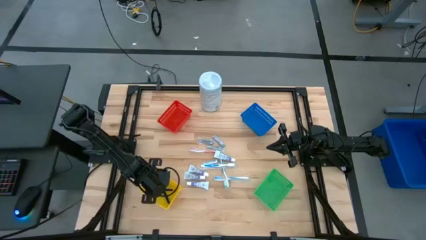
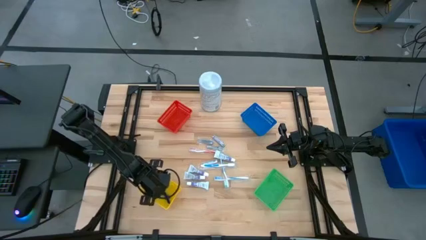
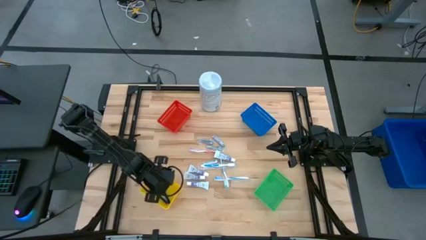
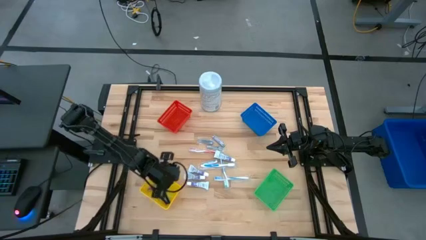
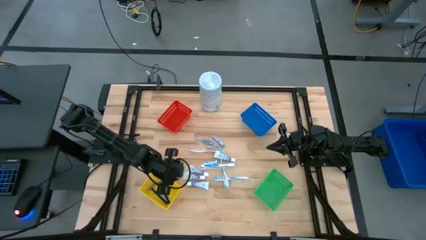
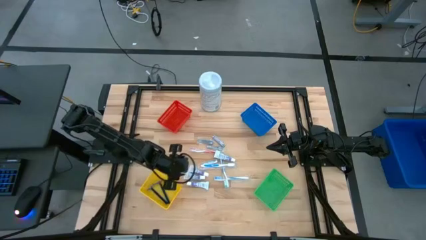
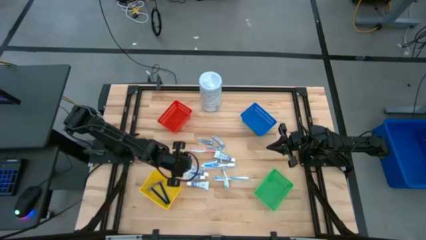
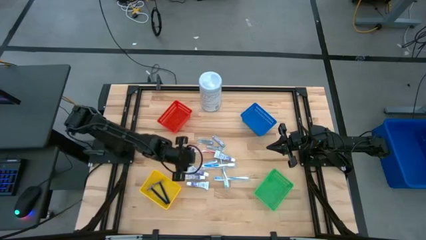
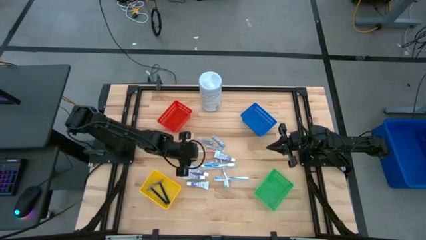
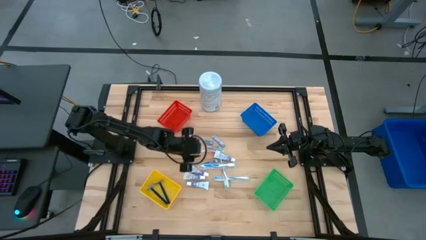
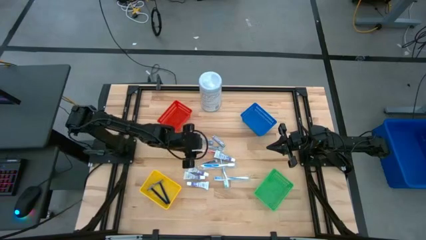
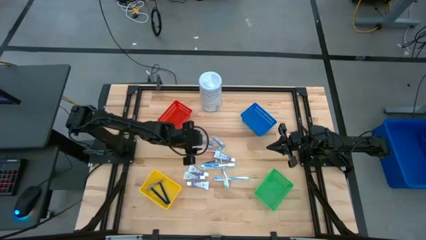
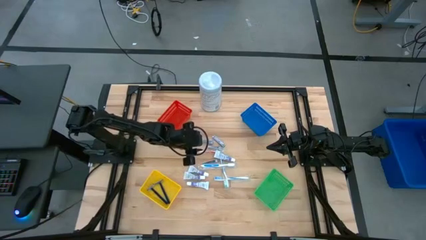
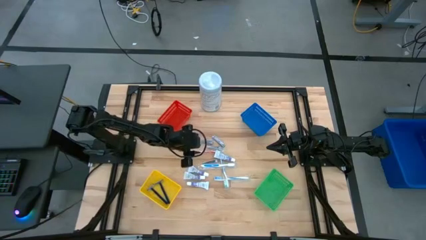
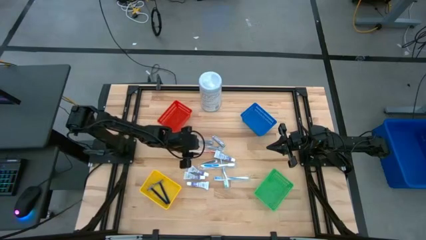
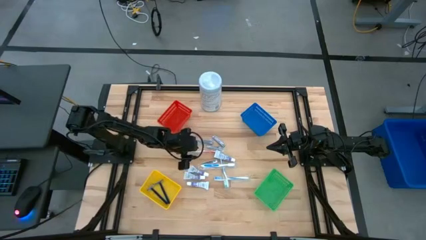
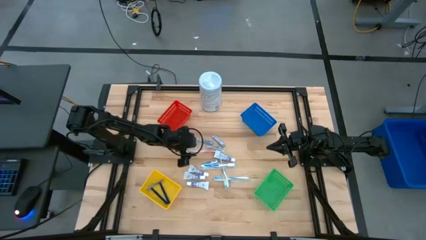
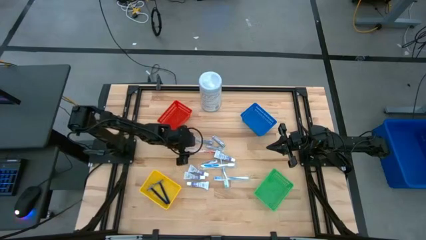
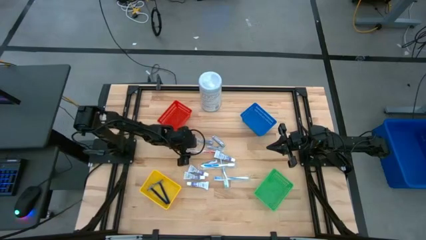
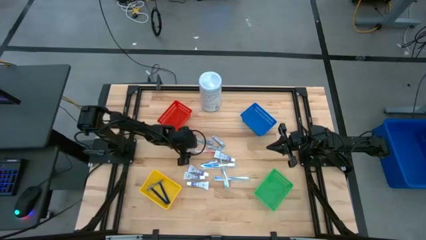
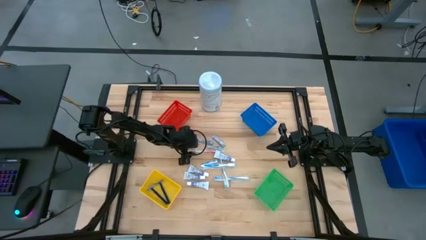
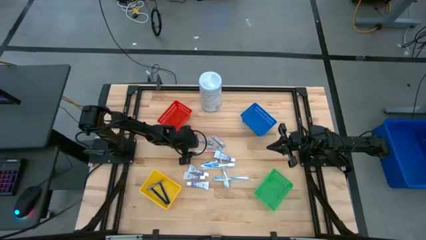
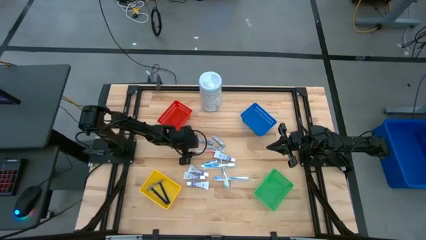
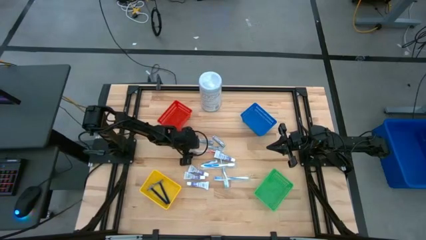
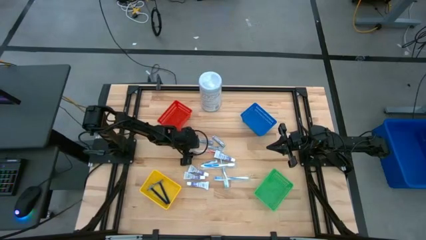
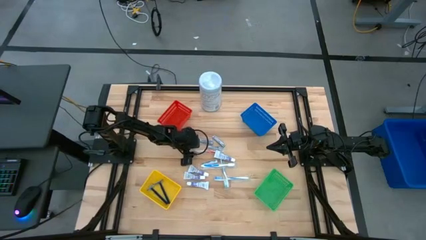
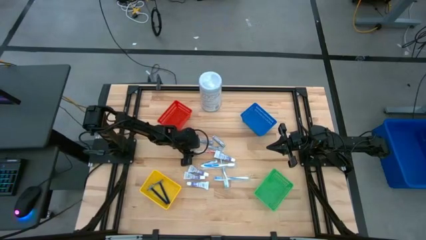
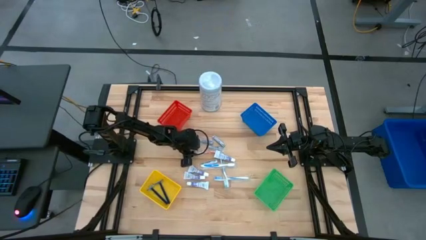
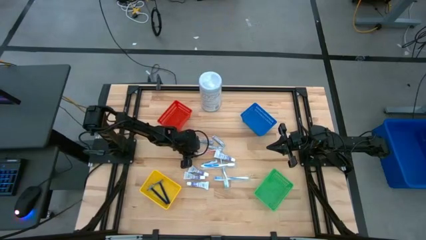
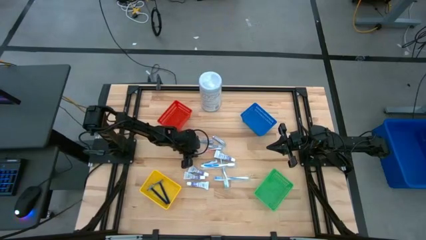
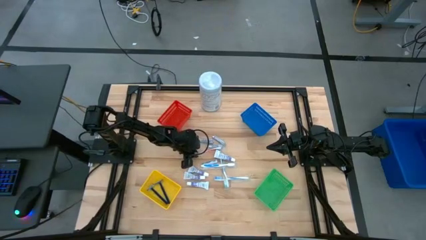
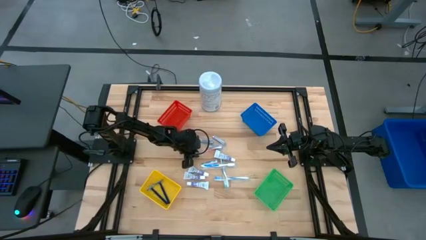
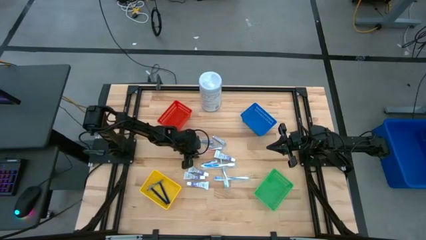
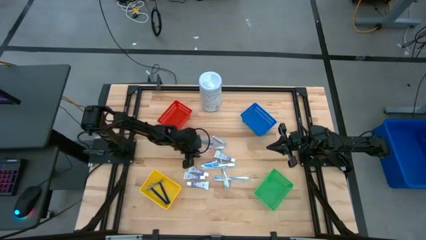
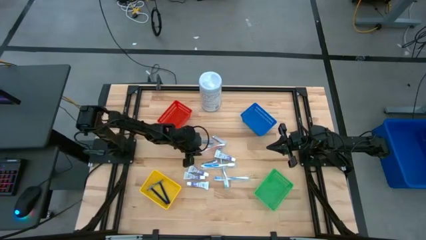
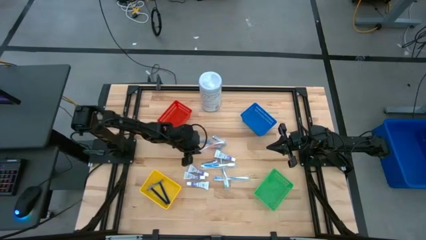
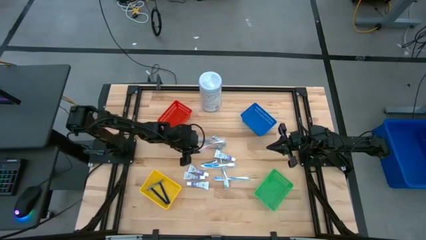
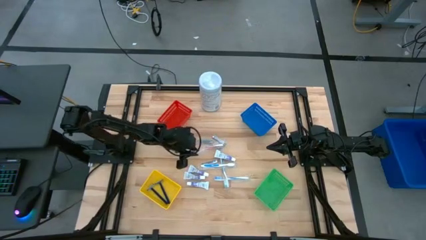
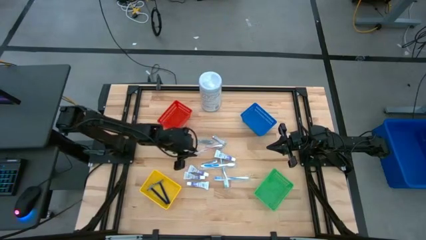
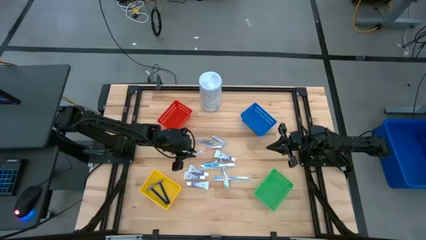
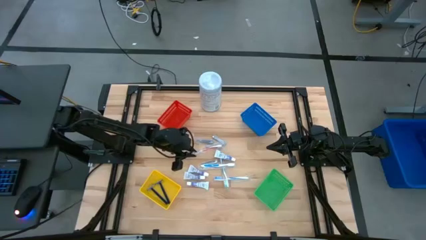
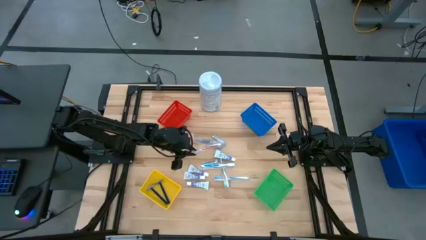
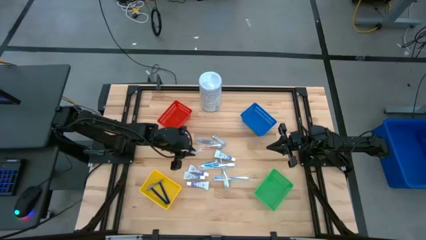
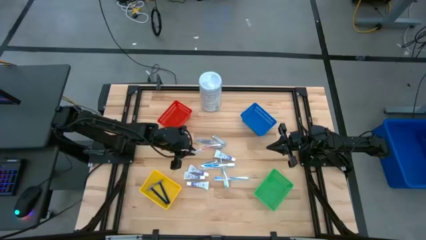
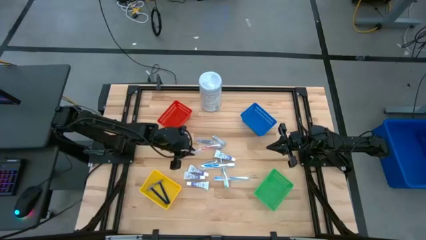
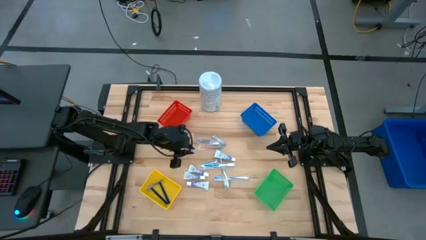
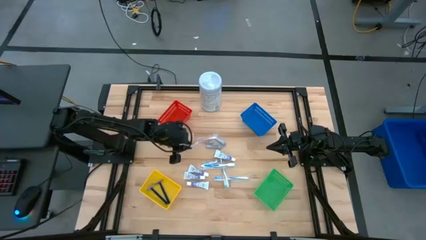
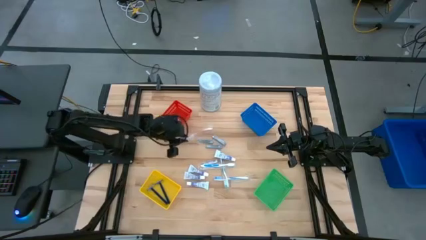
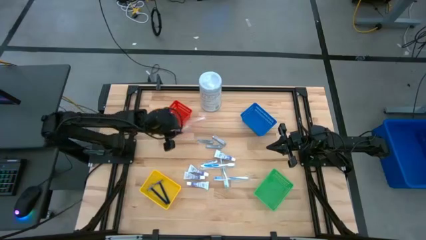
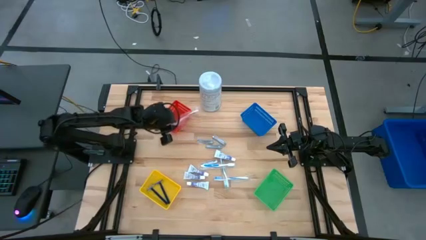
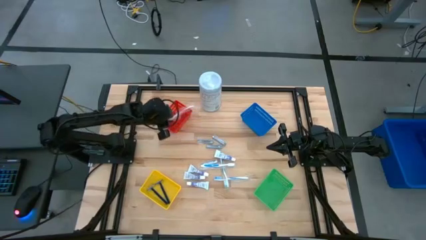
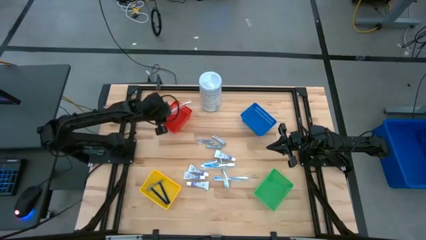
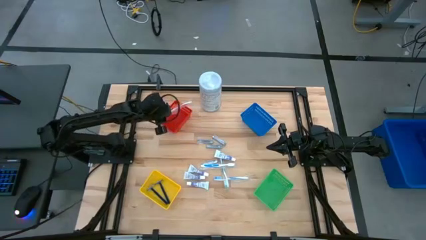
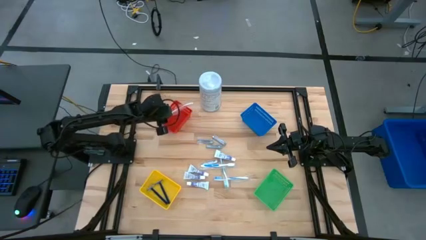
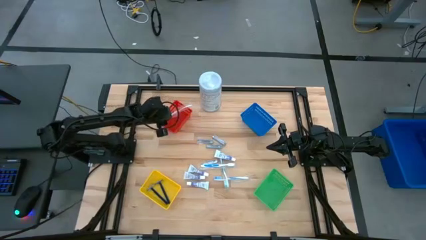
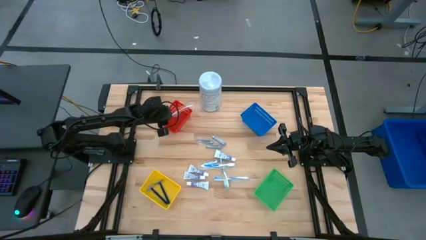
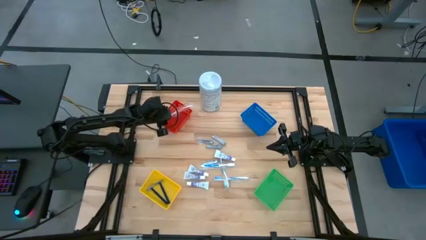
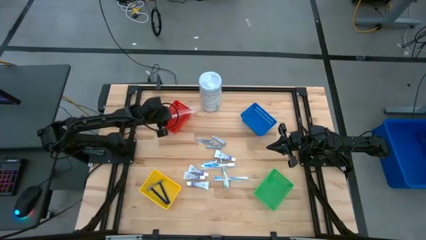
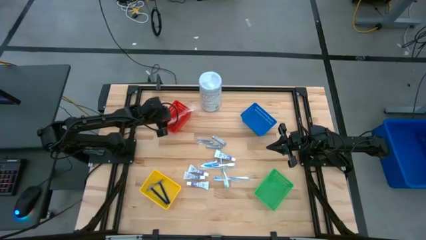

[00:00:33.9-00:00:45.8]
Task: Pick & Place Travel size toiletries
Put the orange toothbrush into the orange basket
